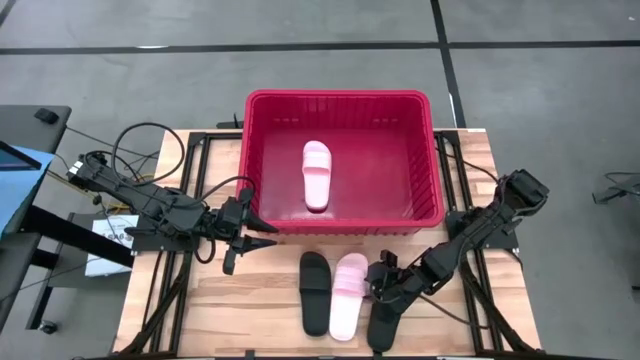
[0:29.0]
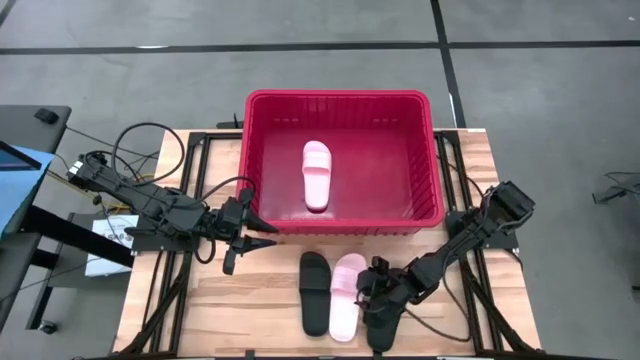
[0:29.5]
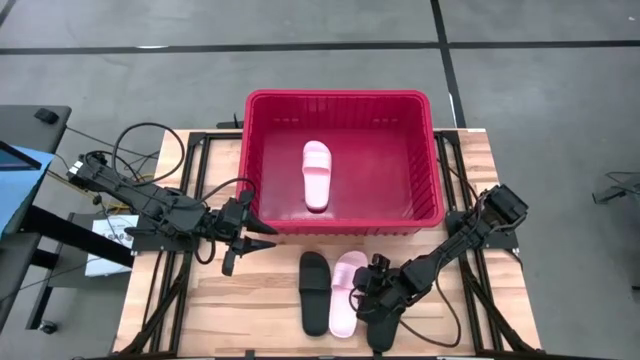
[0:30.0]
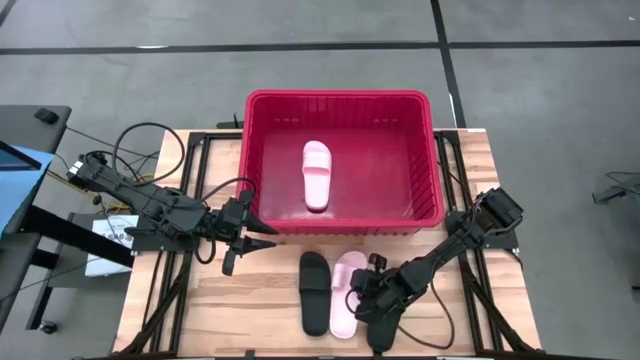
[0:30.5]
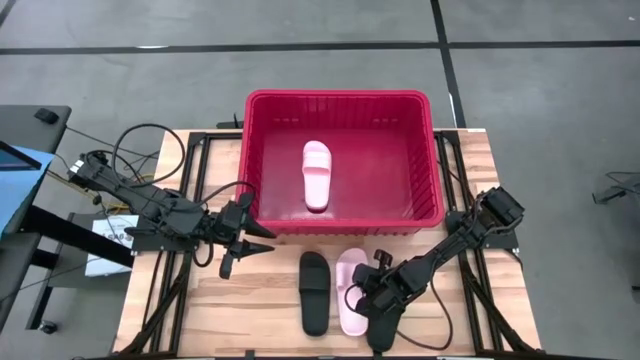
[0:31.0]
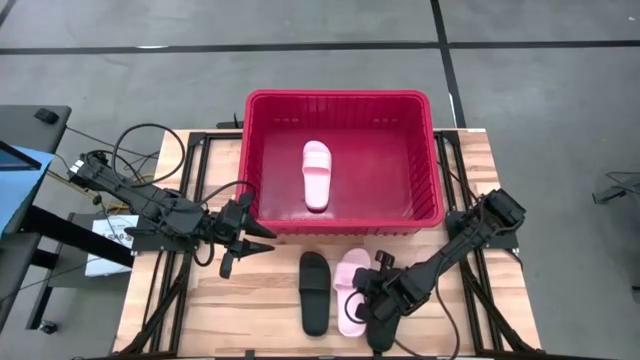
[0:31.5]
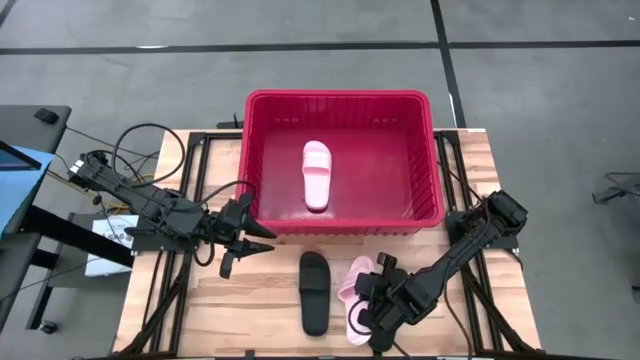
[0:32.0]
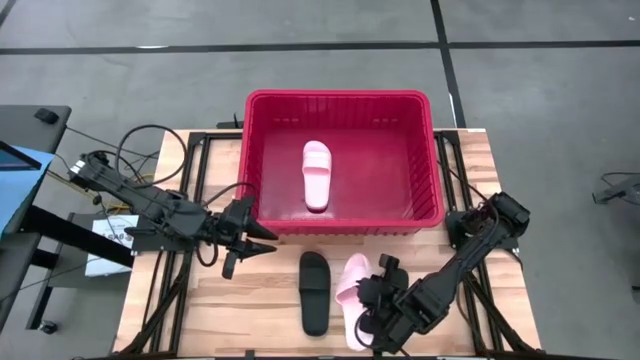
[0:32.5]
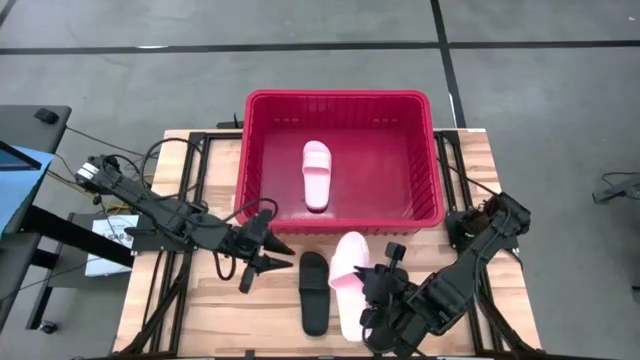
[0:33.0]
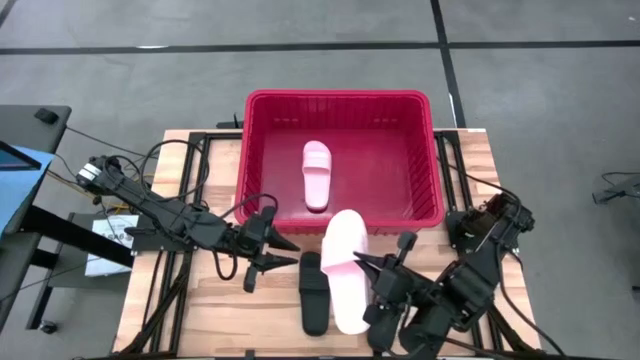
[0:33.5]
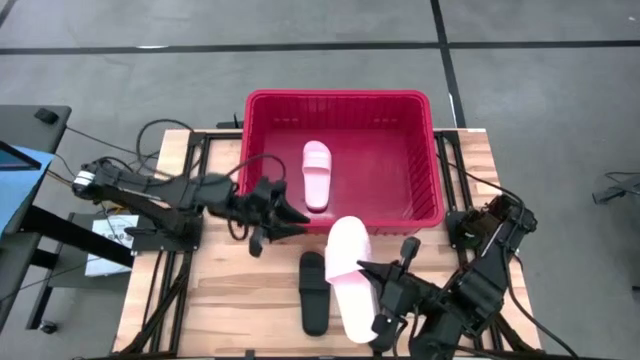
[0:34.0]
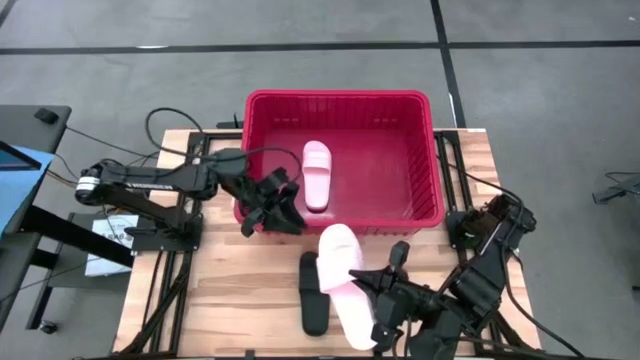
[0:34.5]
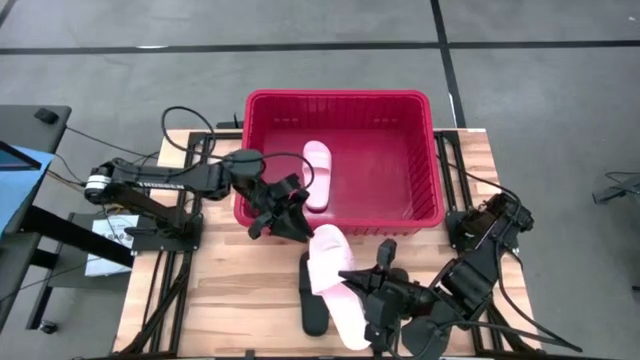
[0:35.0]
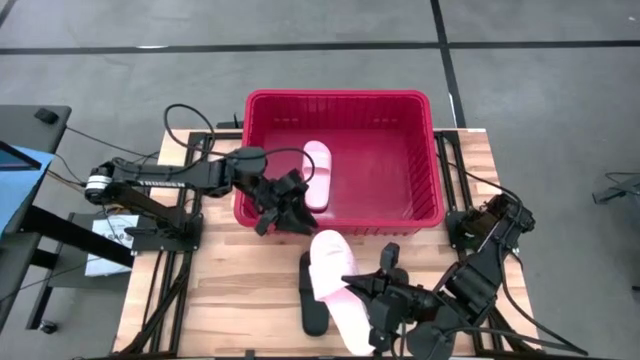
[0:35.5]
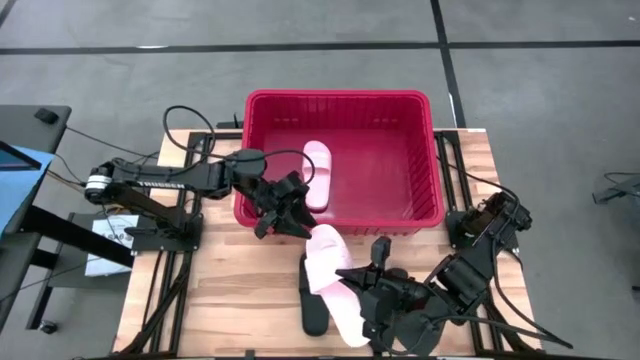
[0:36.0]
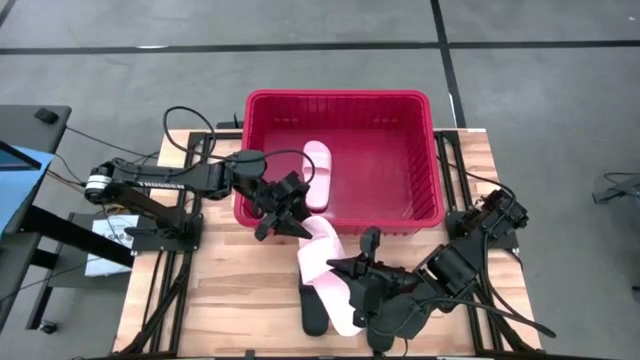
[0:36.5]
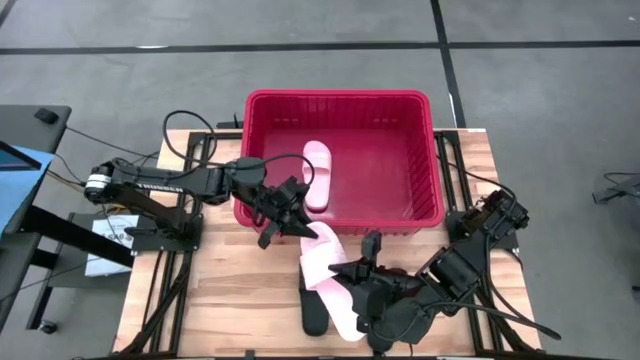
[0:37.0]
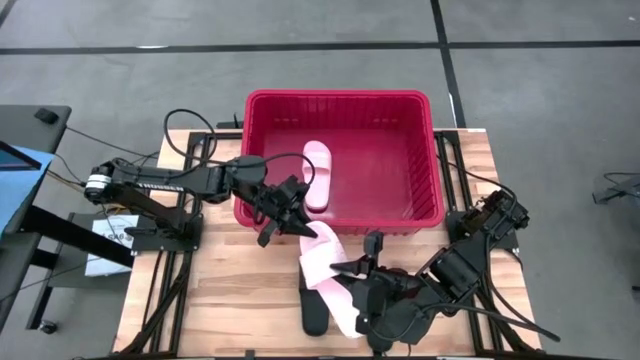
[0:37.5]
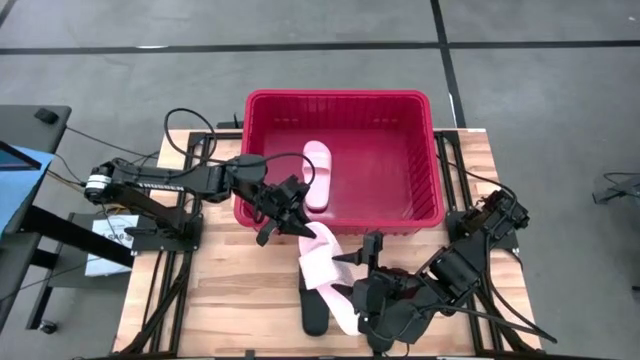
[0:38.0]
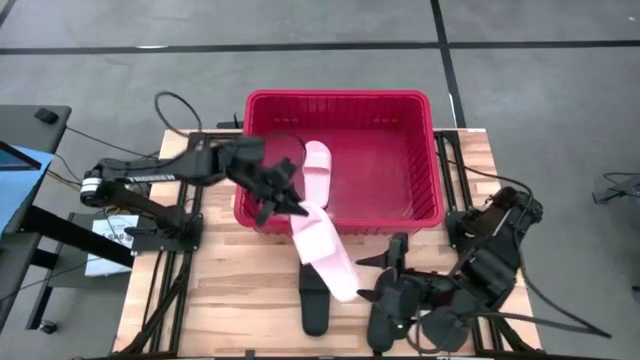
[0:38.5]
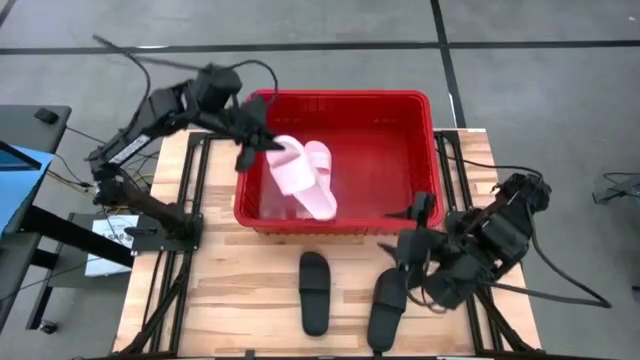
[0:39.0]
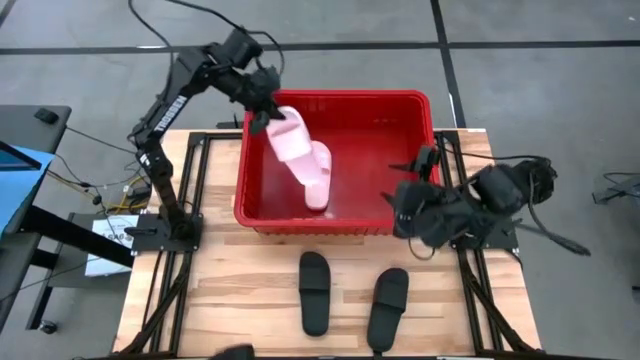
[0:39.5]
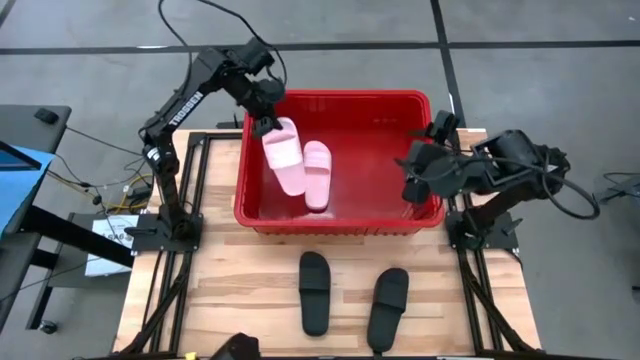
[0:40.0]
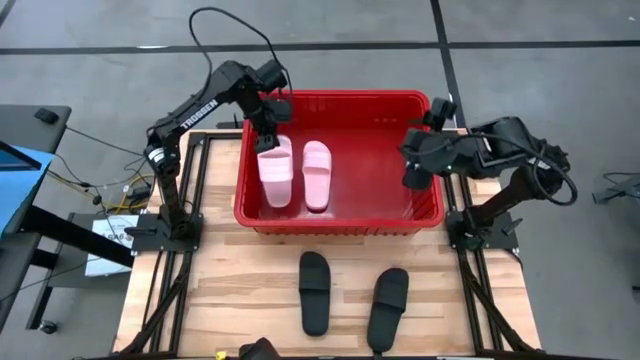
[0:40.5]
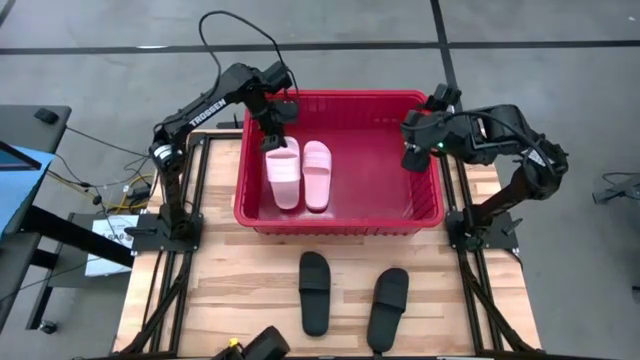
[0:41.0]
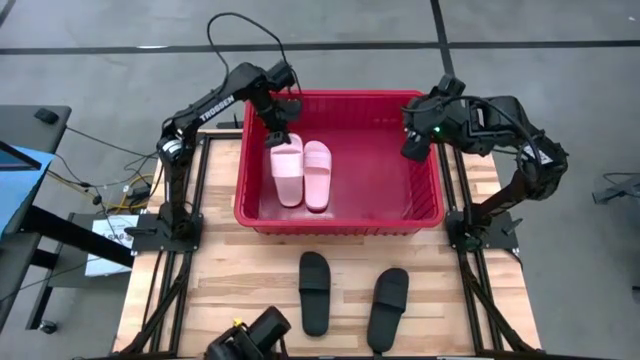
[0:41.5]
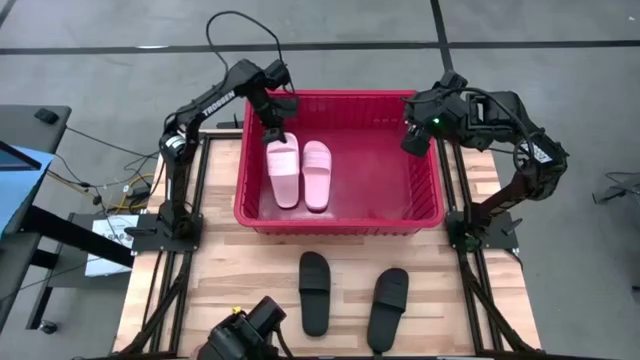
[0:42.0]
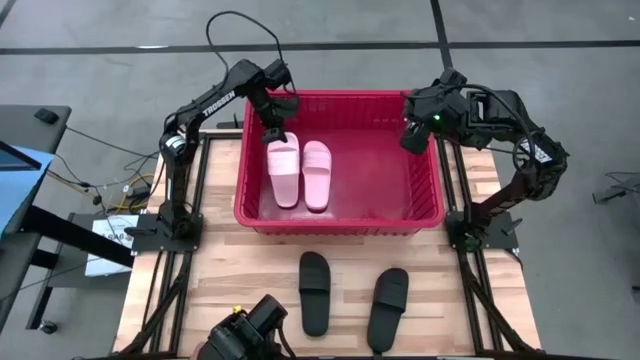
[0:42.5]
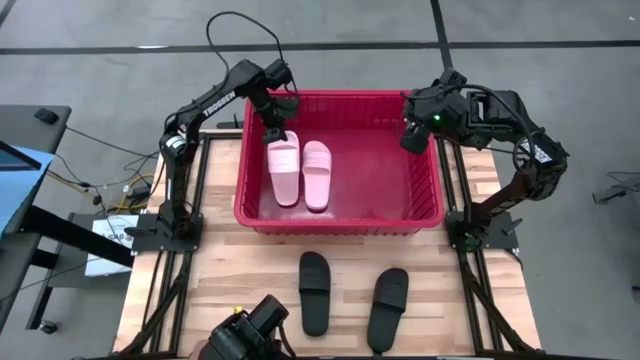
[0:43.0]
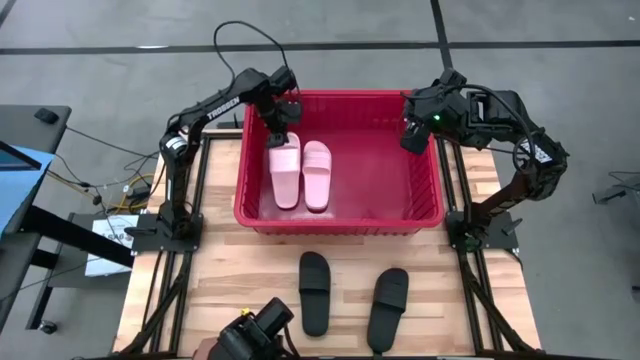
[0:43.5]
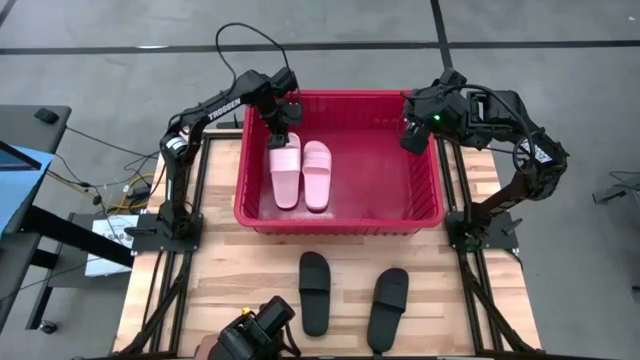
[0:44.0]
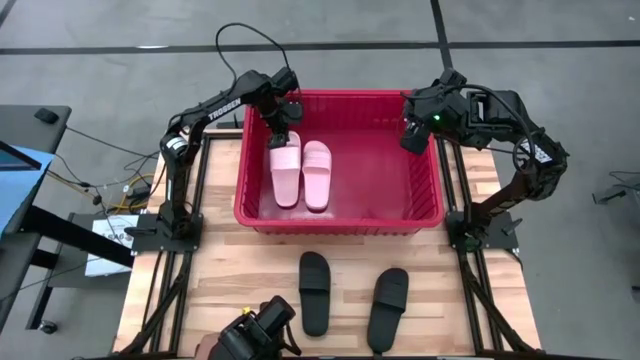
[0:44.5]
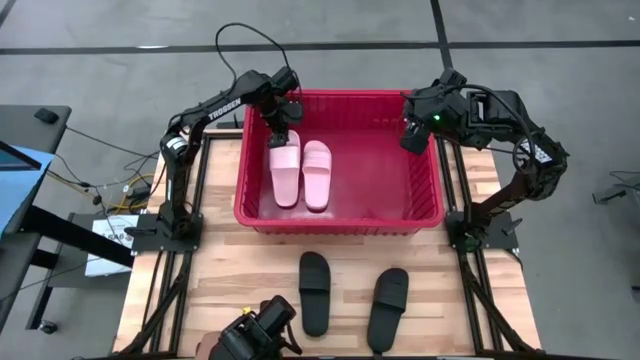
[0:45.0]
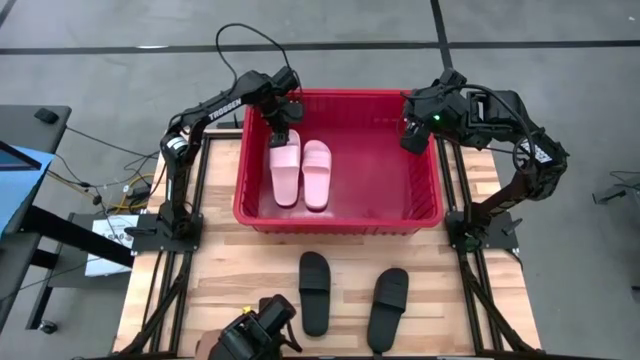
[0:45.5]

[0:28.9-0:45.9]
Task: Pick and place slides into bin
Put the pink slide into the red bin

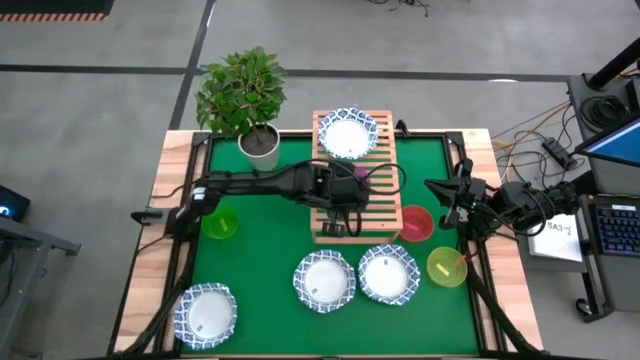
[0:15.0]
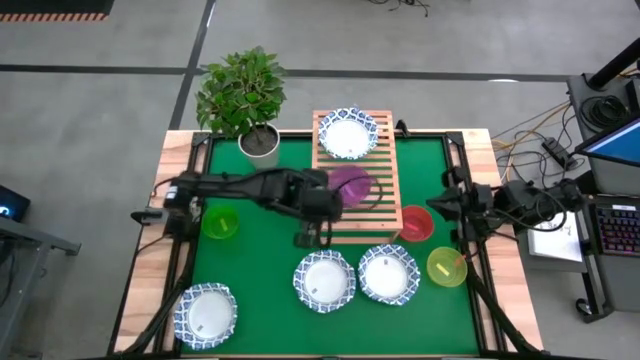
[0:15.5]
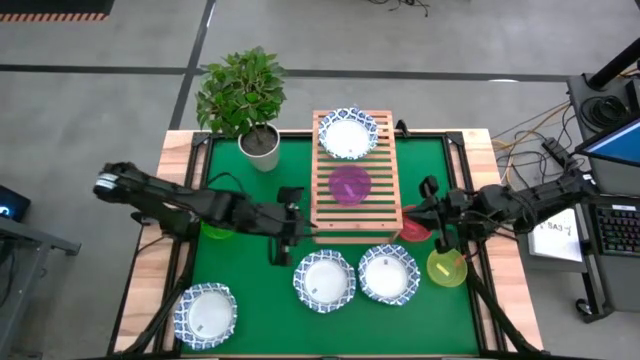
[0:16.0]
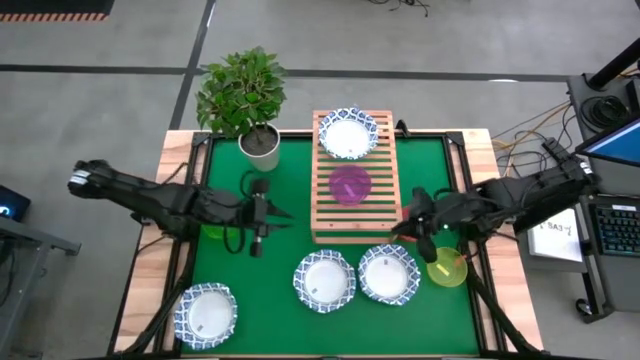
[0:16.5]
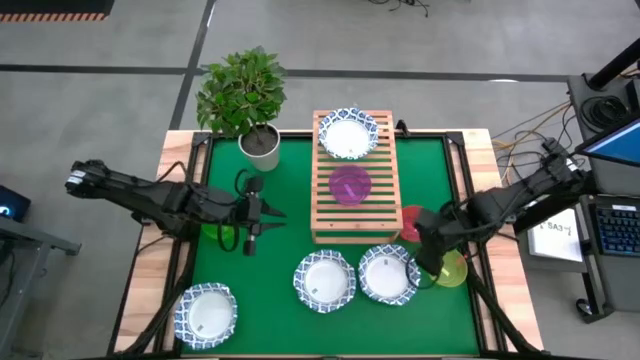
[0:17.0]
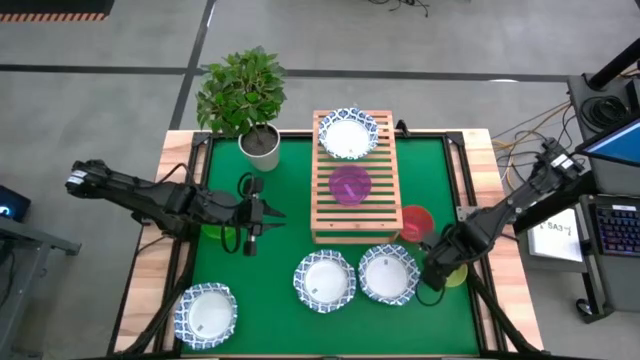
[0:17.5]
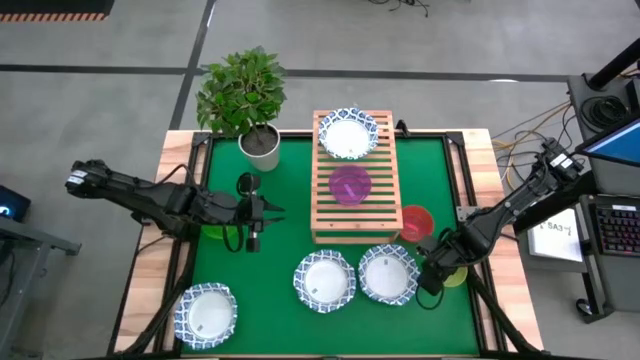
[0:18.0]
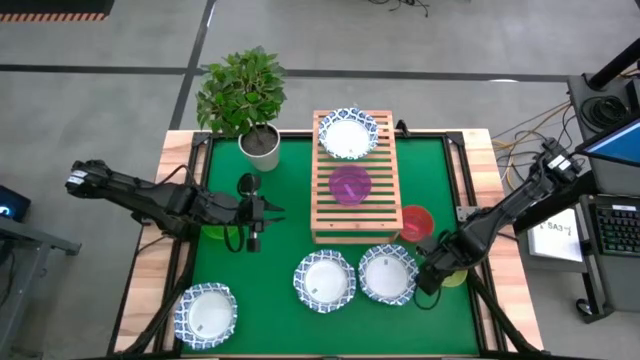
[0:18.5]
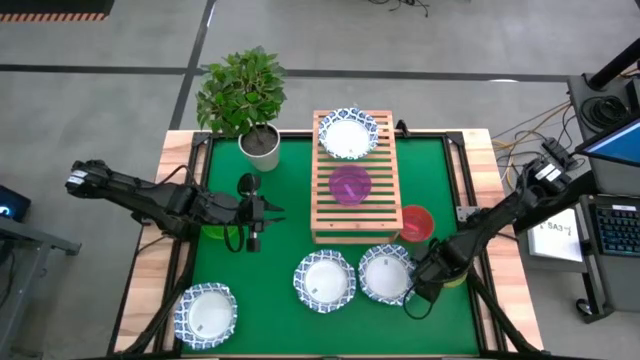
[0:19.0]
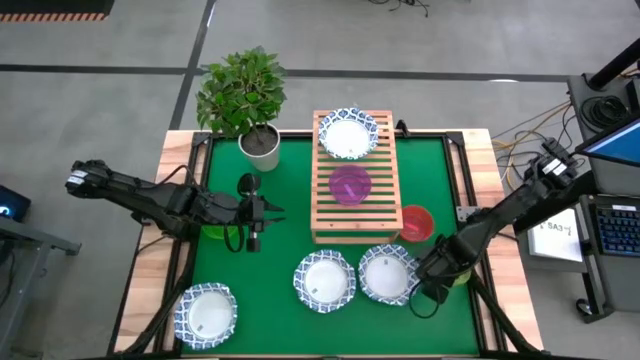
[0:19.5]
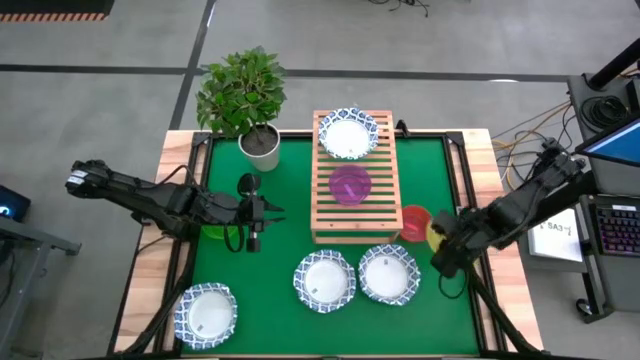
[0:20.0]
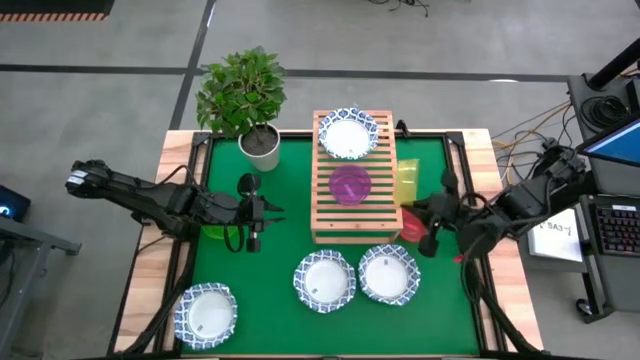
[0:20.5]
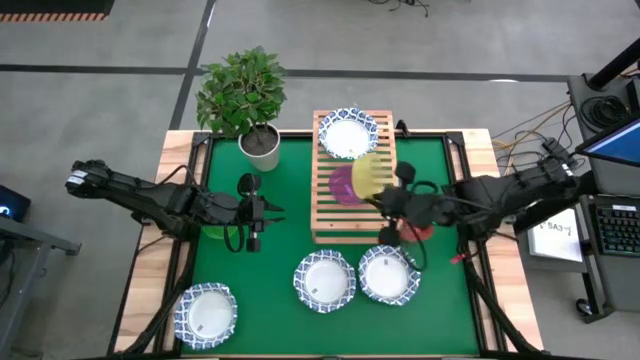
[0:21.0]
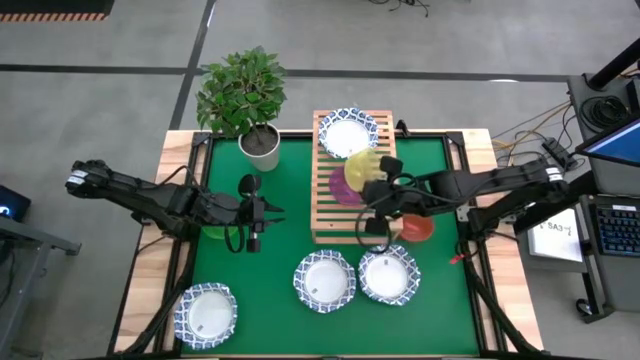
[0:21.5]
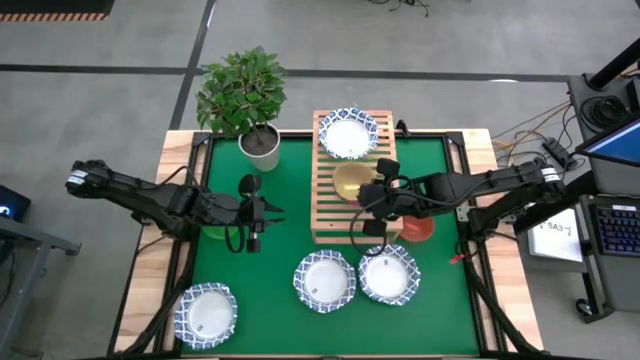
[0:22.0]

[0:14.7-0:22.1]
Task: Place and stack bowls onto a shelf
Stack the yellow bowl on top of the violet bowl
